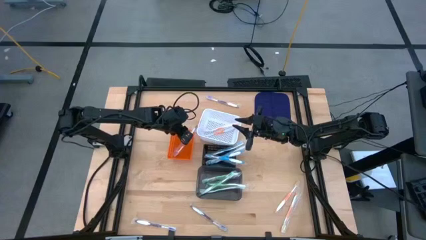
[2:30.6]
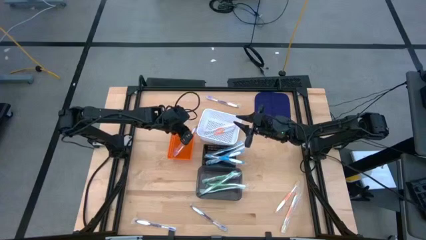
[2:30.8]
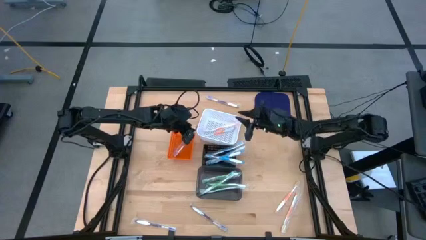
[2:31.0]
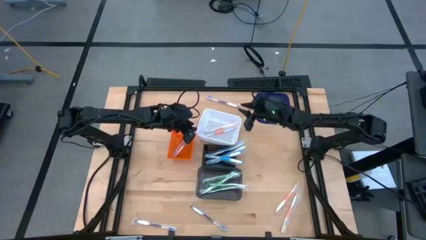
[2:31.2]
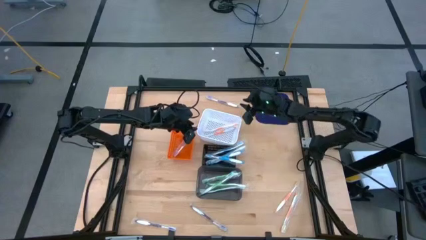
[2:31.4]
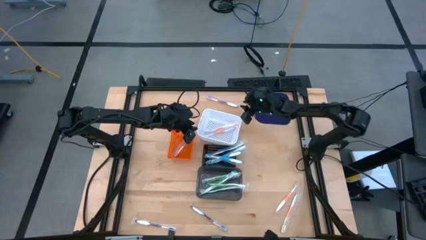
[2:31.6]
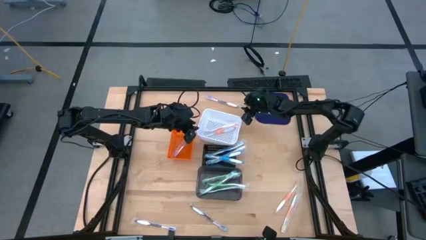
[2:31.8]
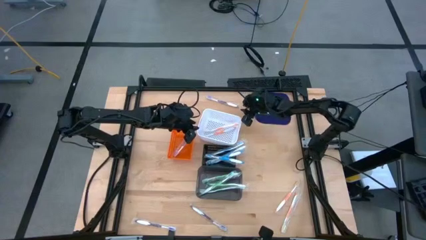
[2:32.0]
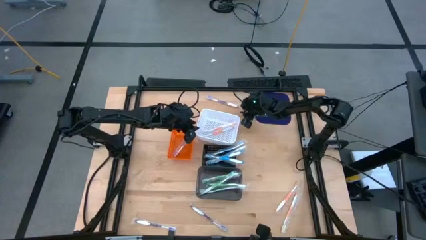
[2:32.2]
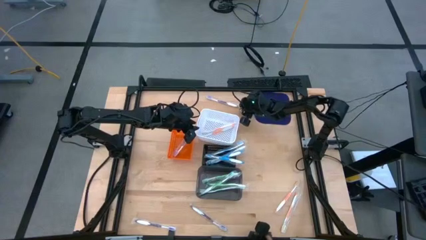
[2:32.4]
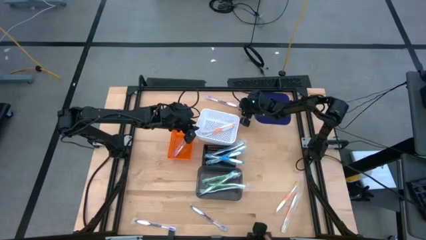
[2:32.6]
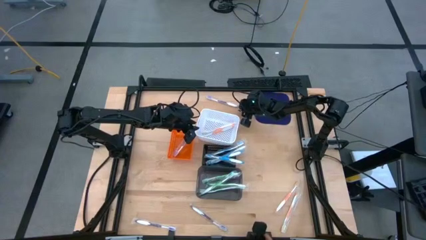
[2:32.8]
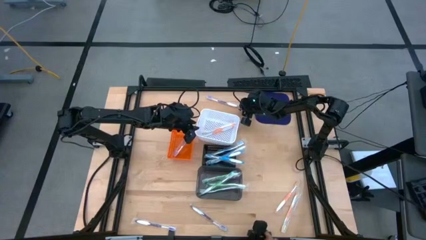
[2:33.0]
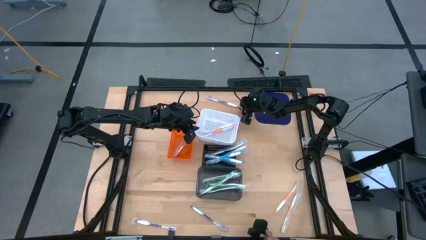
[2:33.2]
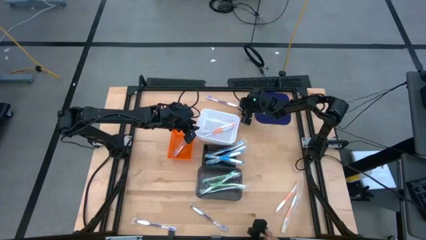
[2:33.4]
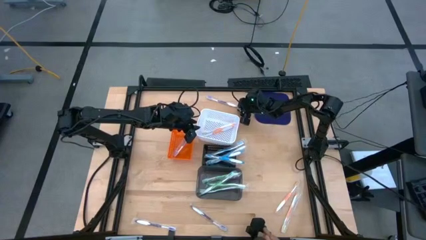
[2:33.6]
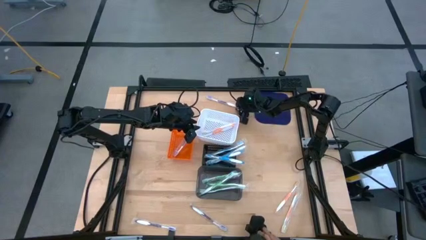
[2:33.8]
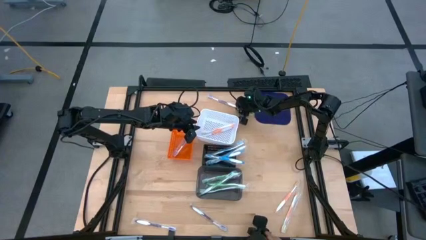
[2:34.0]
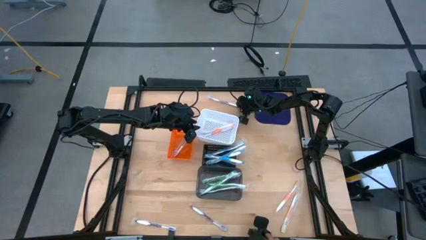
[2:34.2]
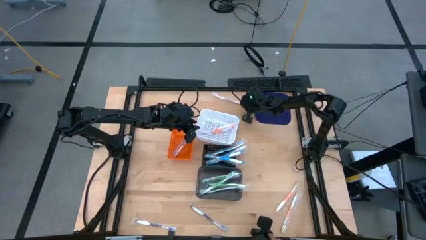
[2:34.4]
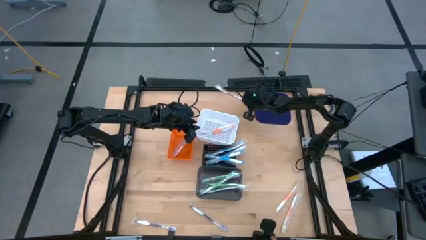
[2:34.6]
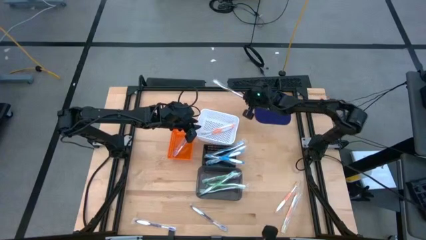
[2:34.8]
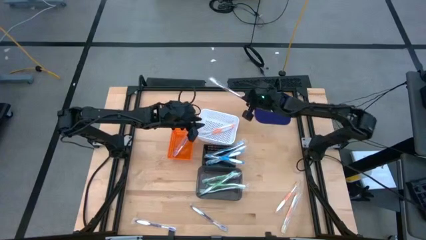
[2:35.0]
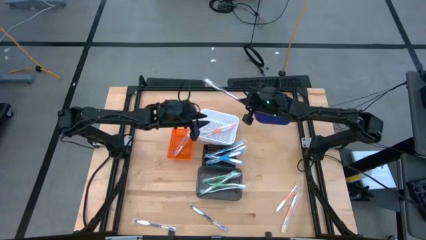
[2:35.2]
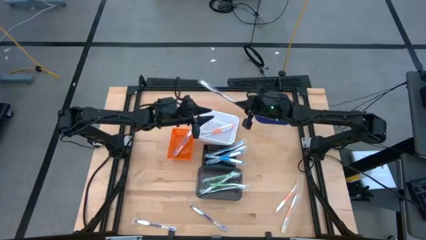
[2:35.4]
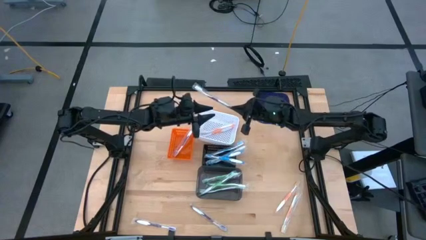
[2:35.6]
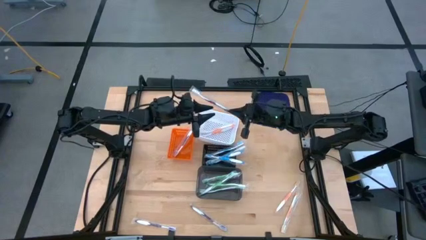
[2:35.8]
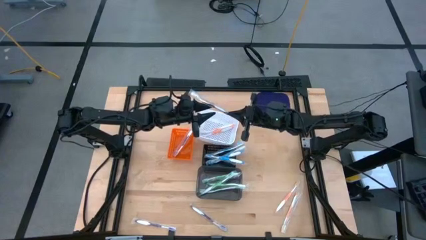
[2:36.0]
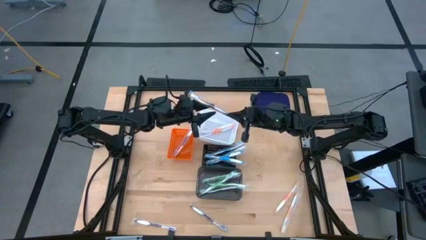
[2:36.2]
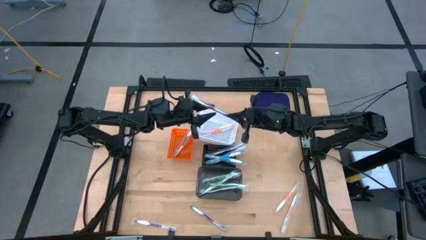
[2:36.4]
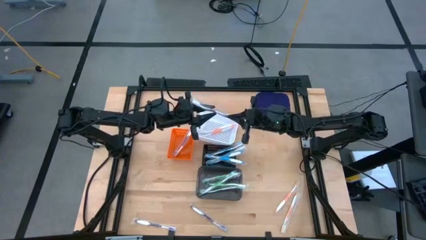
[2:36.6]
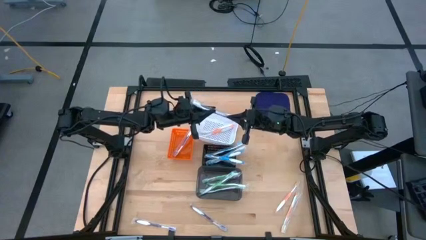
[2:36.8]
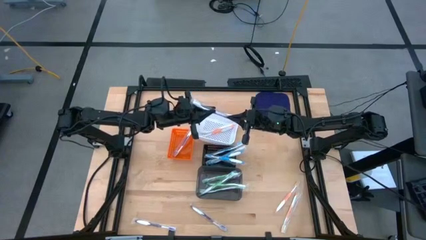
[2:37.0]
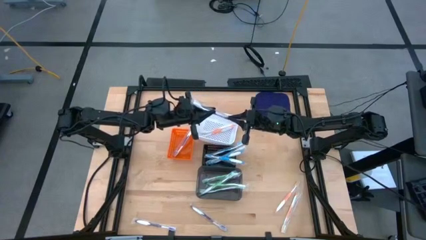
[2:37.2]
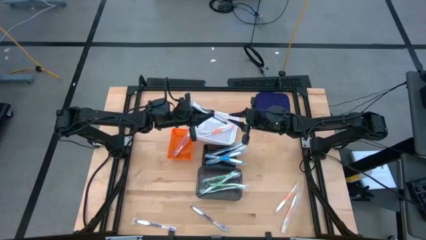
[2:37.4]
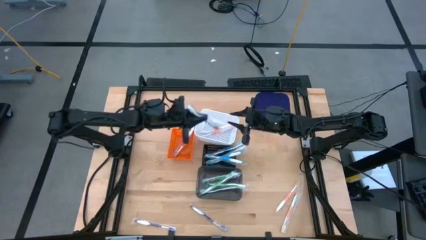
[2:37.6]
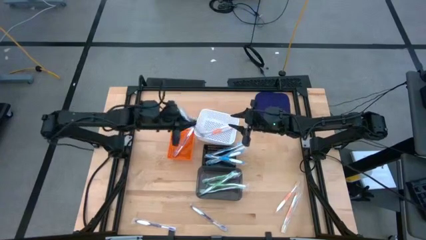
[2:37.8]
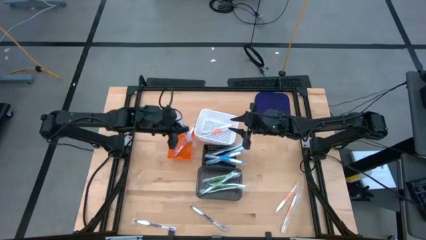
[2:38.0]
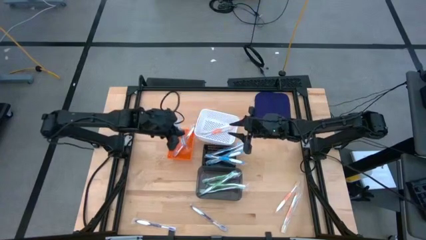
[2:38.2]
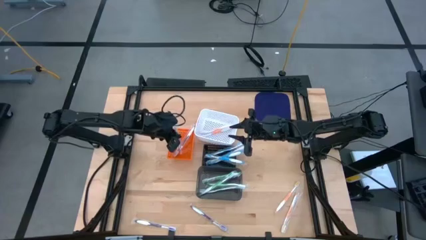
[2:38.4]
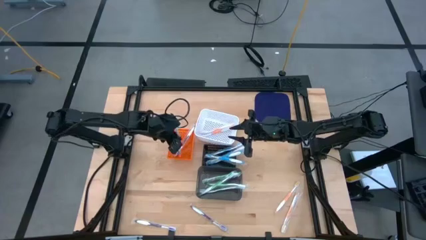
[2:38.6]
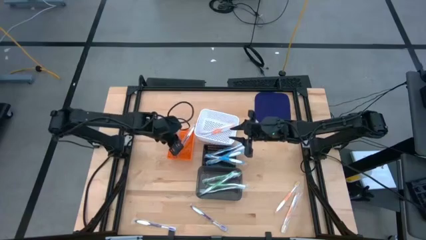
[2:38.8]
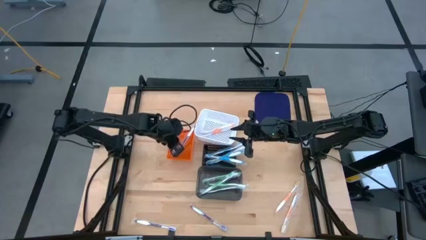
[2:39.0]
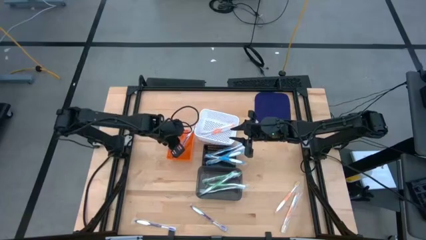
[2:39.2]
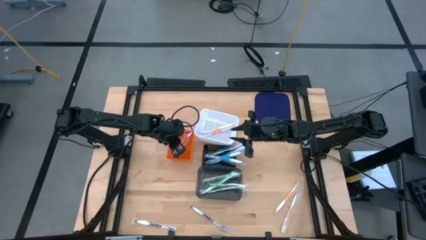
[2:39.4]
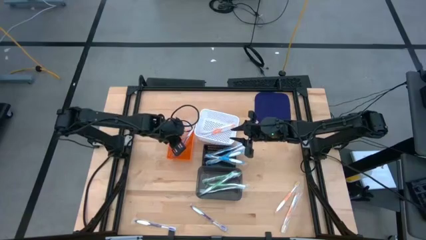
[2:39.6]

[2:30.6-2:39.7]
Task: Pick & Place Toothbrushes
Put the top purple toothbrush into the orange basket

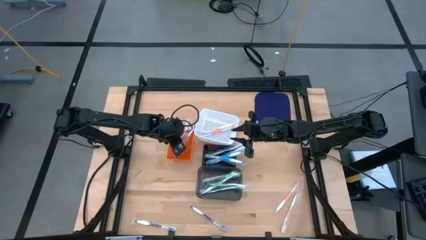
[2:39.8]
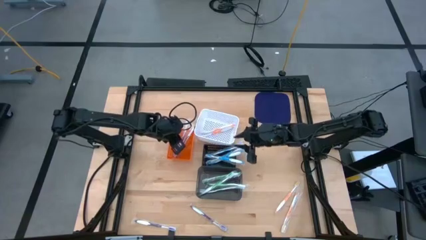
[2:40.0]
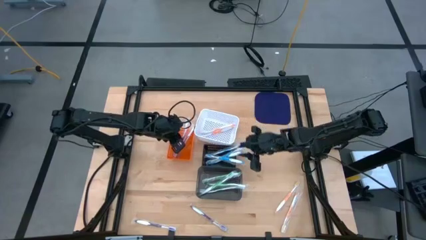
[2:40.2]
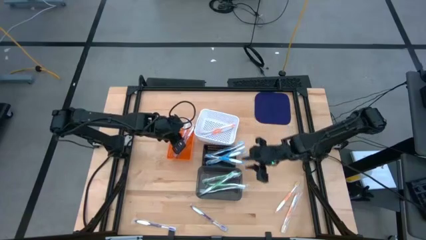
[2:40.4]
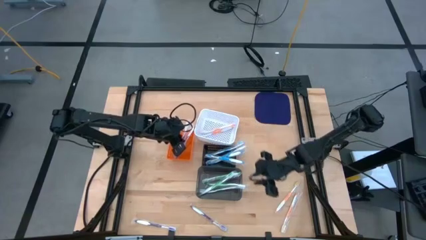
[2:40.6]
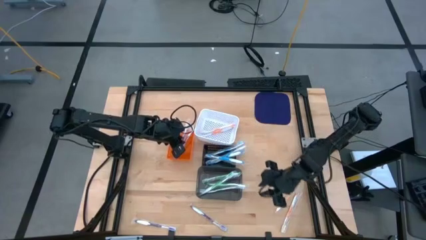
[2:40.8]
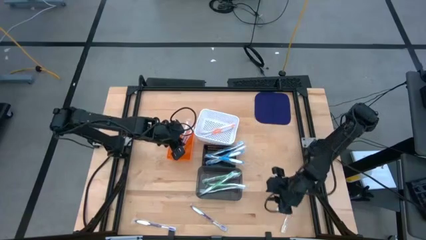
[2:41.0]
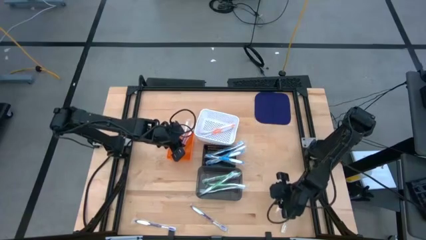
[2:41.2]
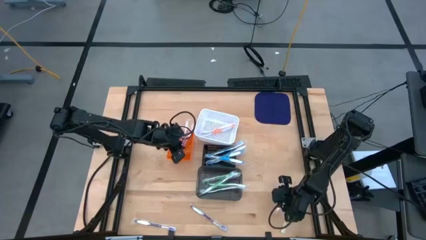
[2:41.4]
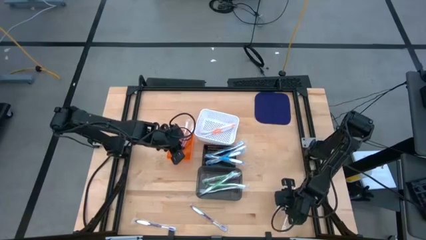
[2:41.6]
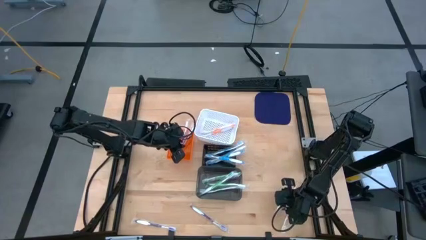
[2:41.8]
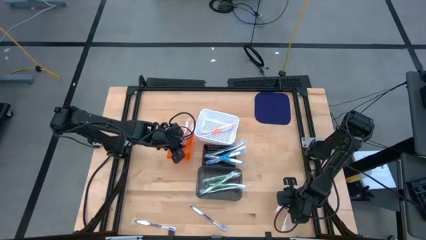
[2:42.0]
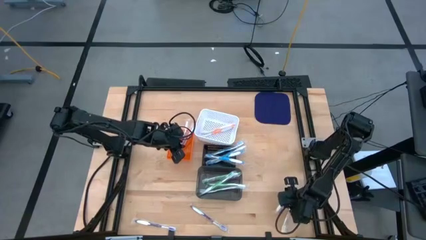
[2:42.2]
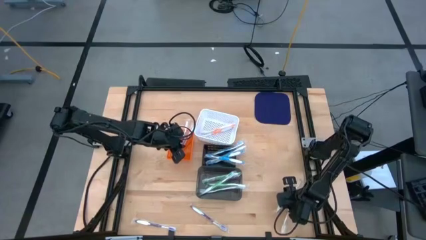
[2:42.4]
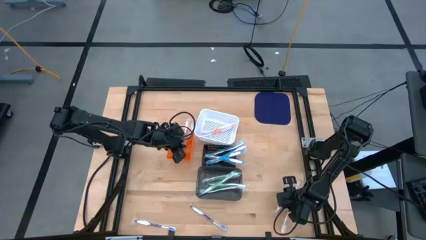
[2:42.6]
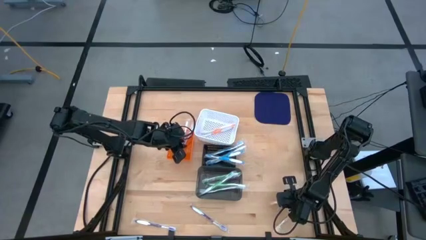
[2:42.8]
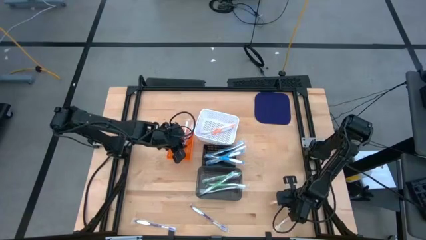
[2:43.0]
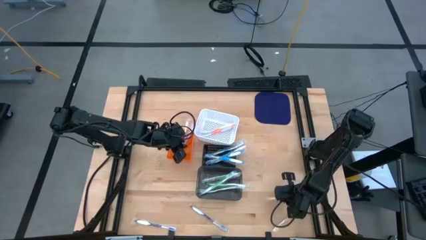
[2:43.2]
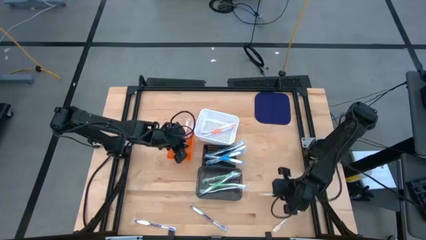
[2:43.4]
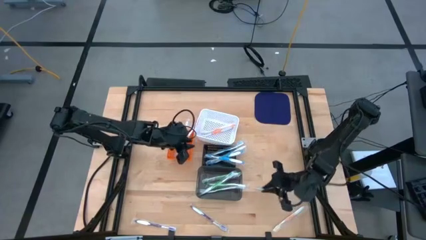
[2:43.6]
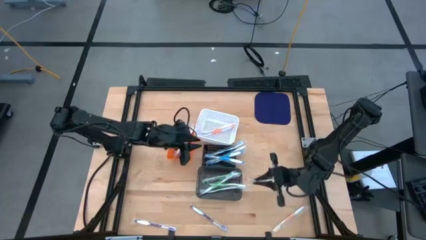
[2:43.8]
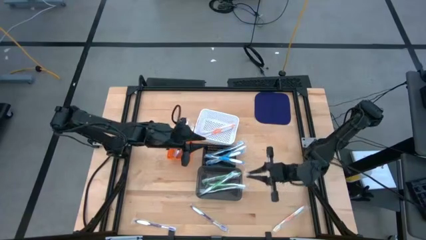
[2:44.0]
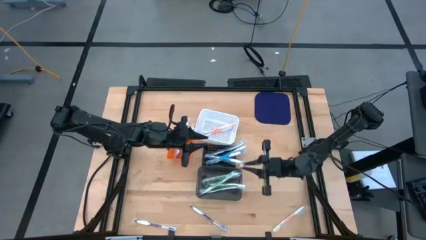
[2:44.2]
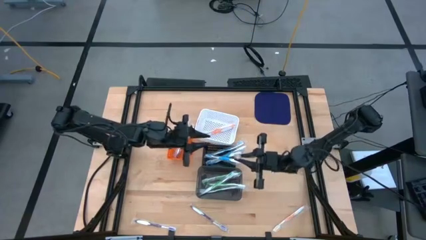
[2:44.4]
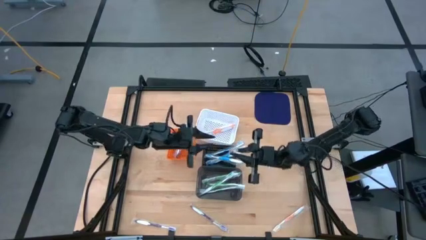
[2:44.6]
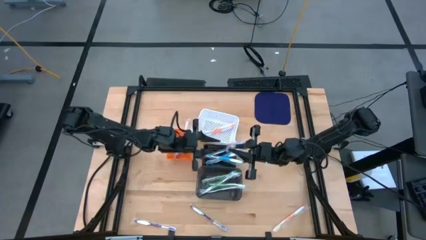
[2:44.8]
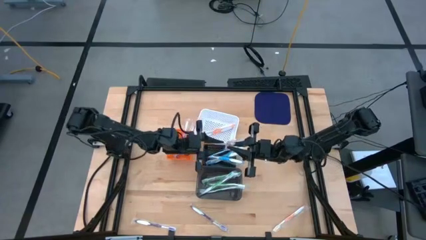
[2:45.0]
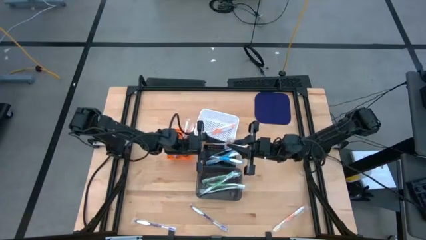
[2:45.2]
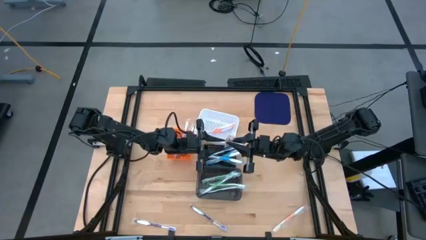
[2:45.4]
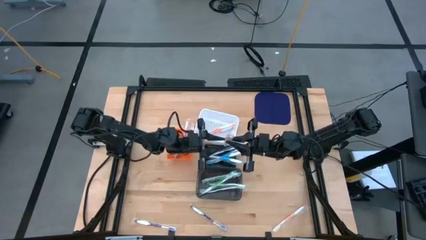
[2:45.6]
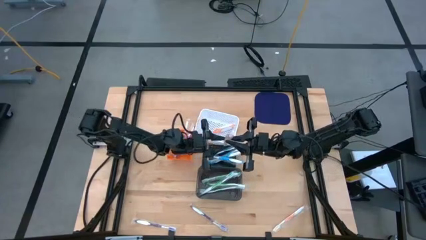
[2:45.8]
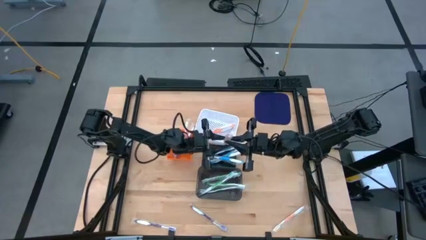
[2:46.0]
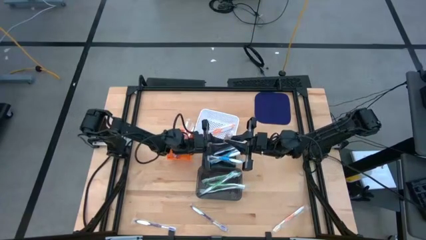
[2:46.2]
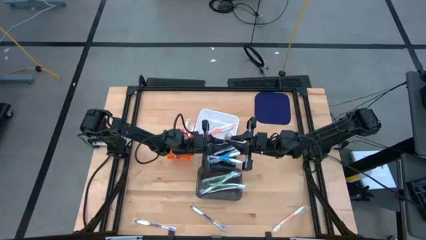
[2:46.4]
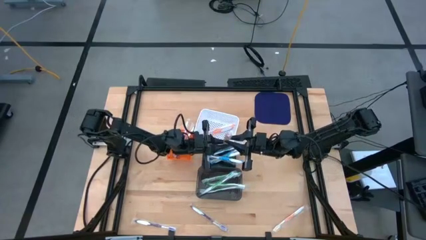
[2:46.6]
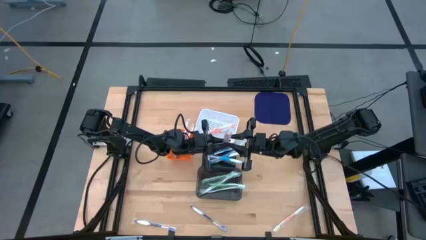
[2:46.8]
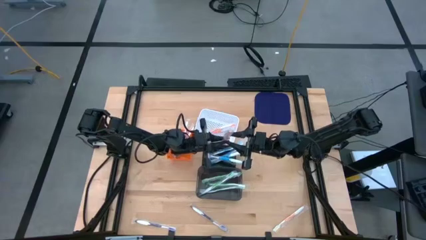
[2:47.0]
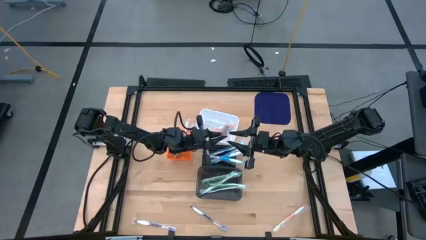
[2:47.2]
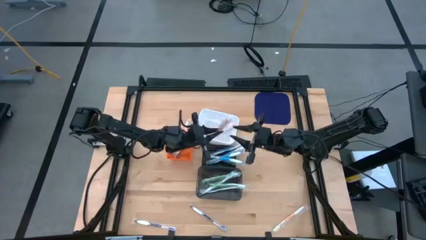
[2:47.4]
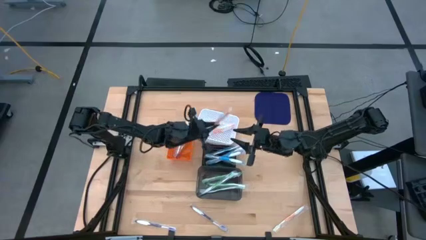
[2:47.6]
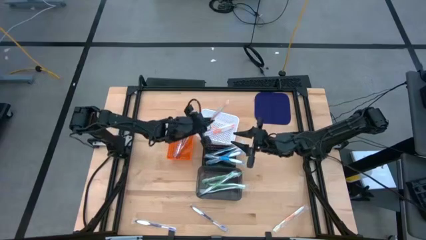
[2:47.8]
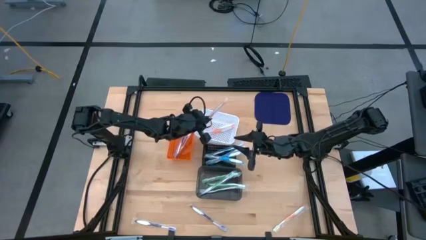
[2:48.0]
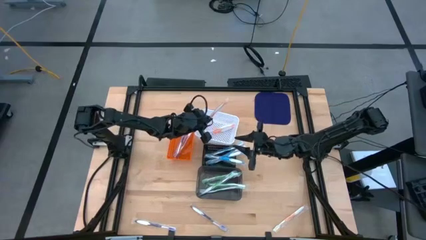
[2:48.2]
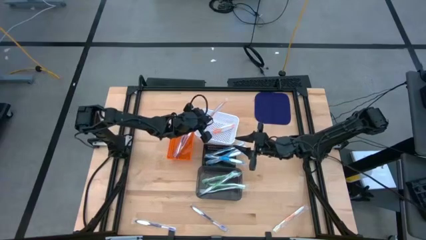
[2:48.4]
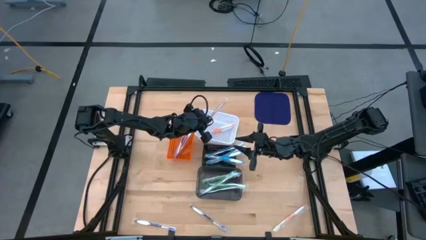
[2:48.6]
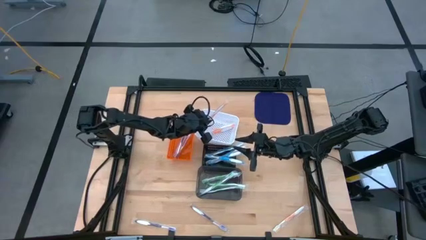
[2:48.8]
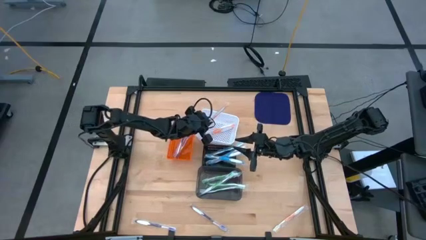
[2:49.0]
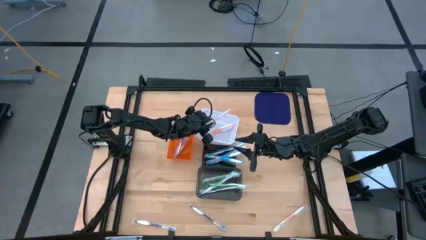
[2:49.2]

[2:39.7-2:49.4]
Put the top orange toothbrush into the white basket
